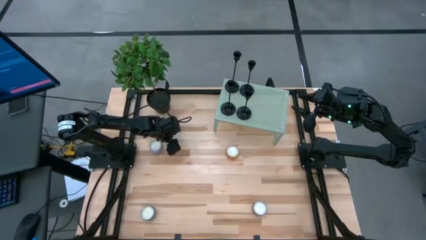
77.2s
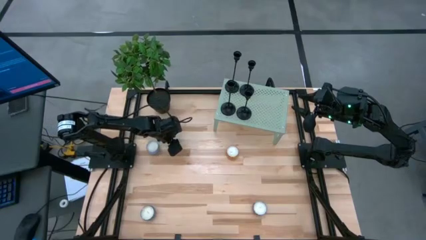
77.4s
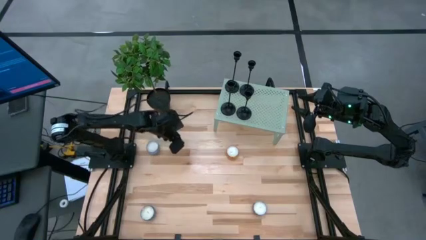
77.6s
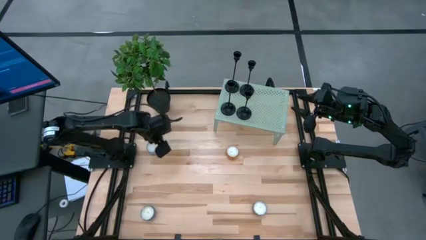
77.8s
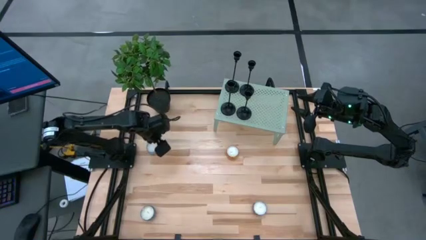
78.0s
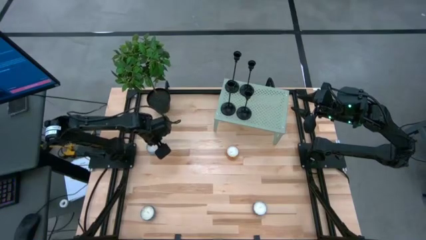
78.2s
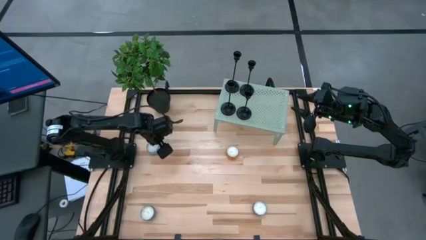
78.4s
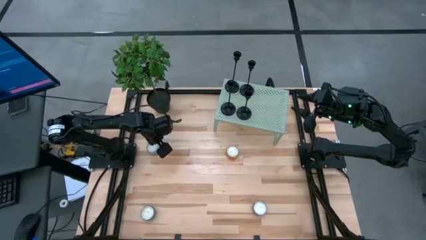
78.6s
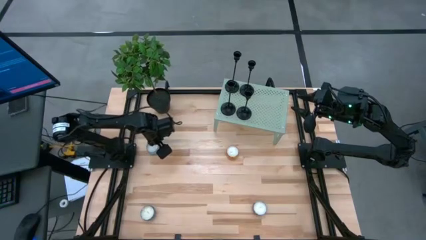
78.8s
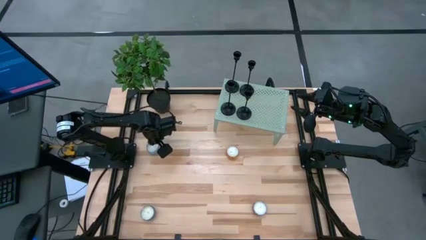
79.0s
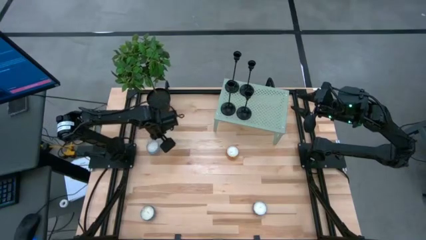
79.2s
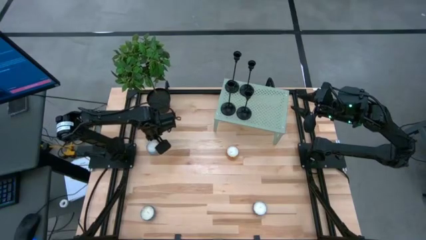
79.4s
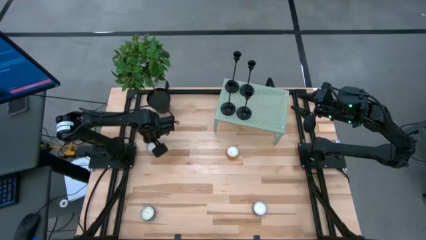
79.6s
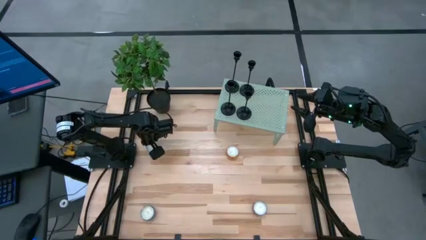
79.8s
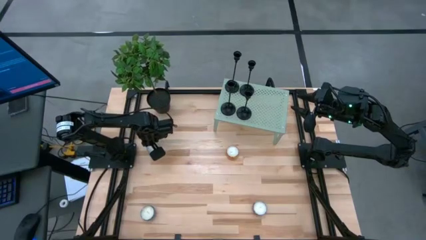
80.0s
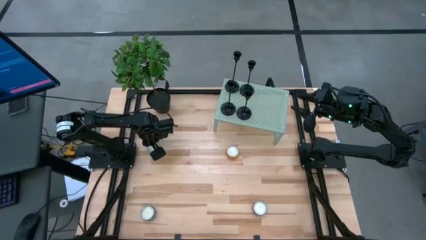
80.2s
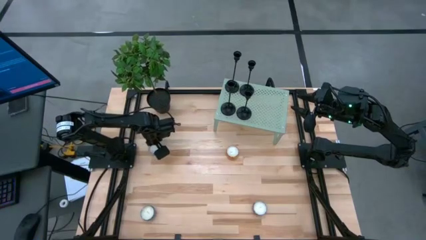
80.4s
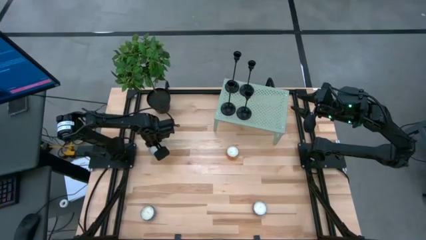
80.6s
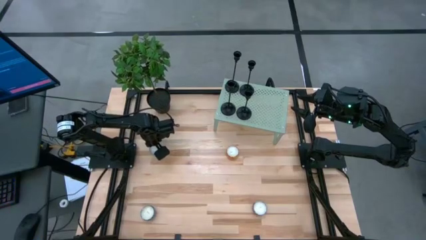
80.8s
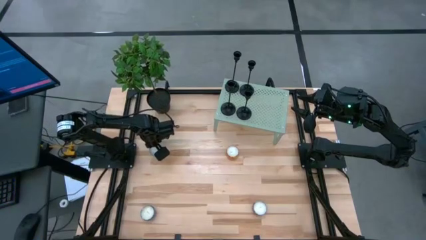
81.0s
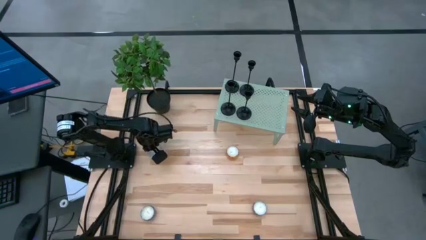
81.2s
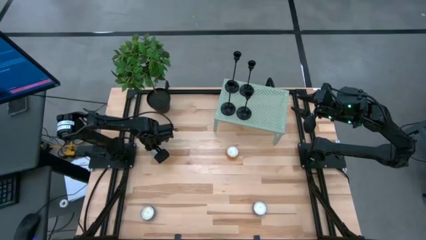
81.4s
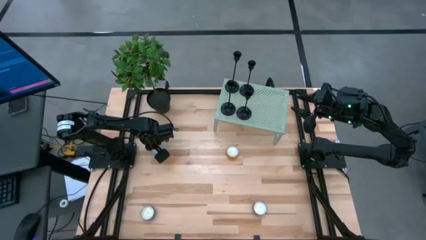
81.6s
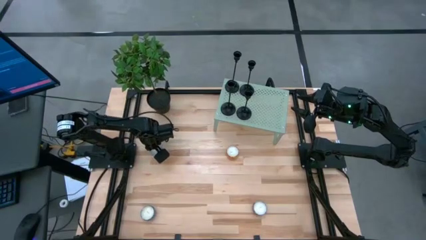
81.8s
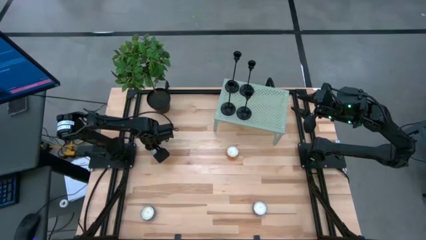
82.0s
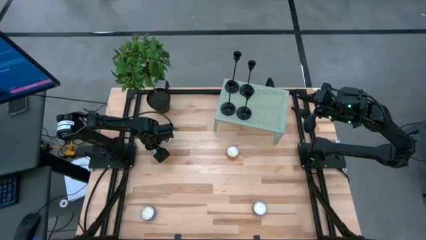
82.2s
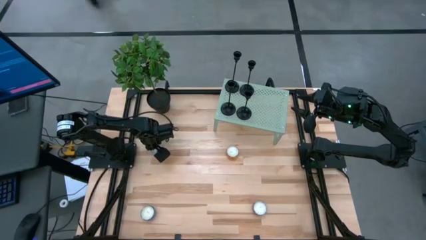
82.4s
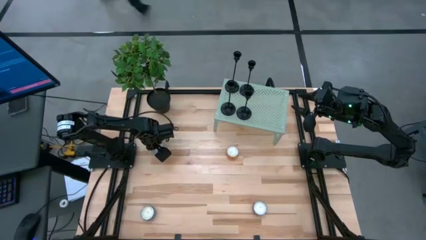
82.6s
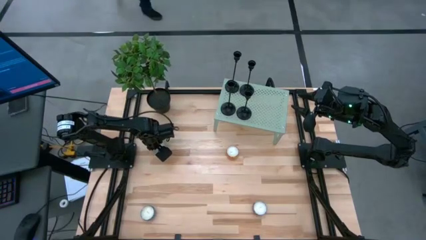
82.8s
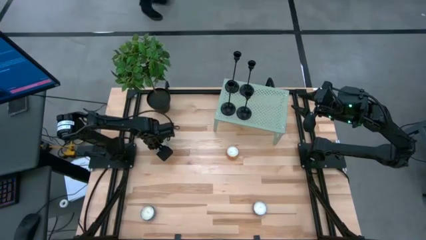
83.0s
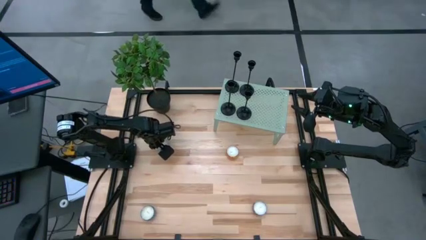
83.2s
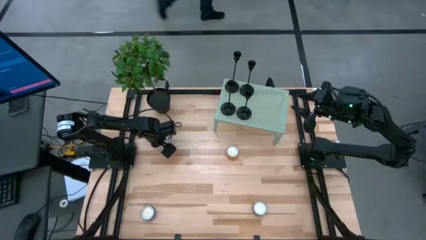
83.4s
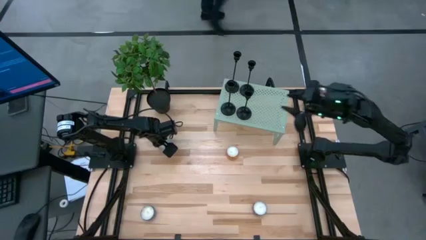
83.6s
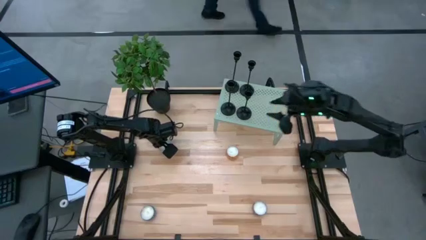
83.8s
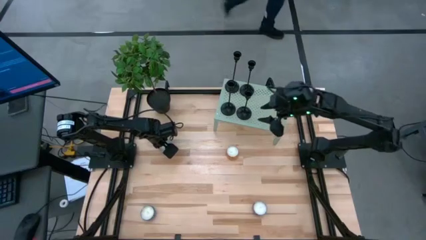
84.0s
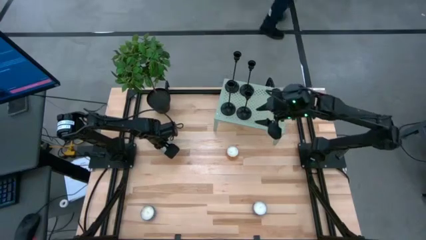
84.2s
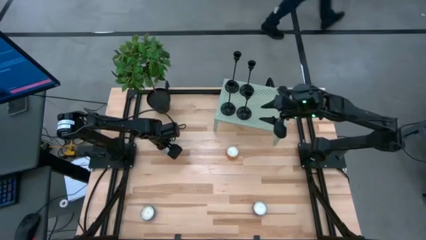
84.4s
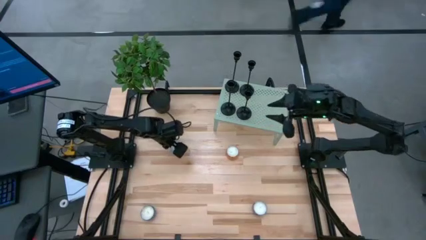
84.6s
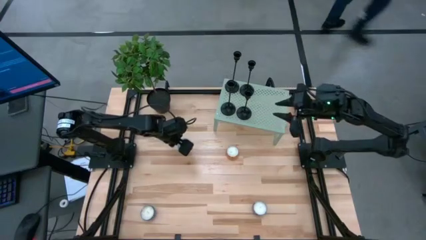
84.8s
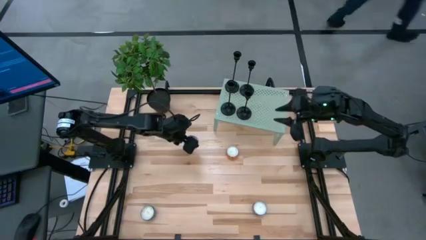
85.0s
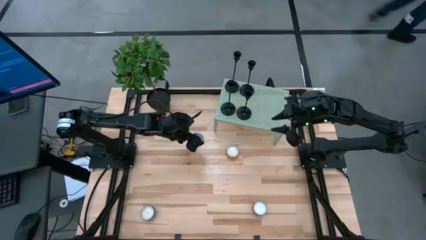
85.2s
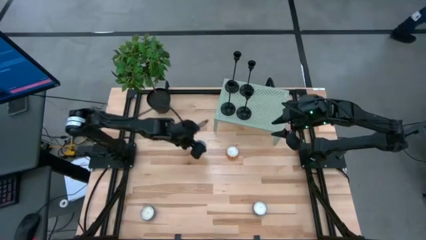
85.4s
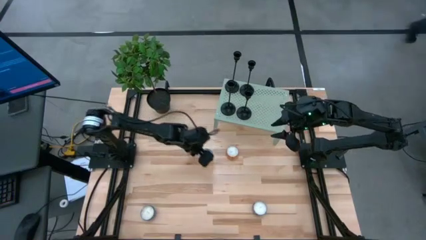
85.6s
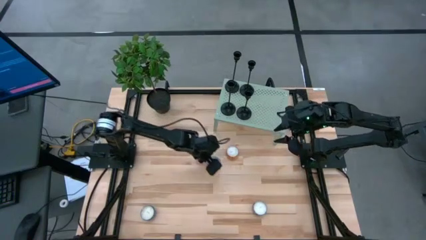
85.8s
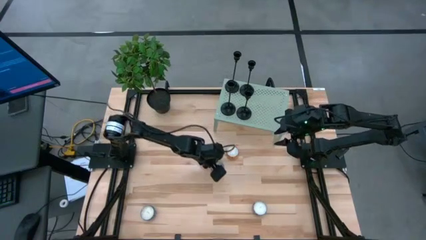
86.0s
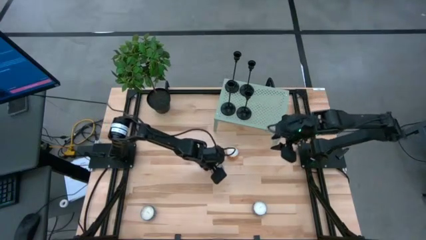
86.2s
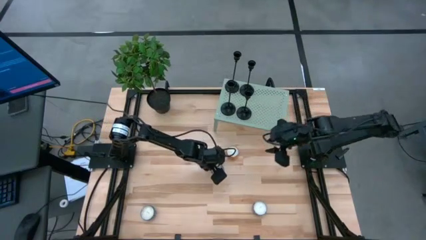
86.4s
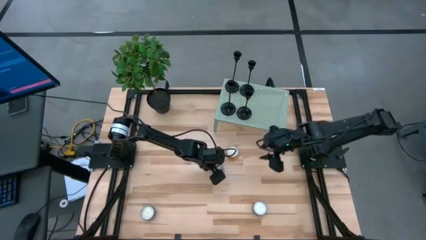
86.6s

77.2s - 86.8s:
Task: Pick & Place candle stick holders
Move the blue scented candle to the center of the table

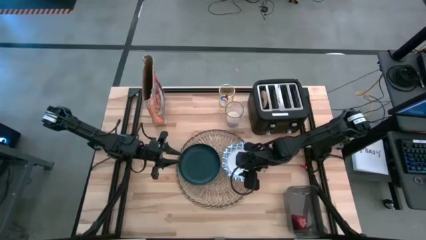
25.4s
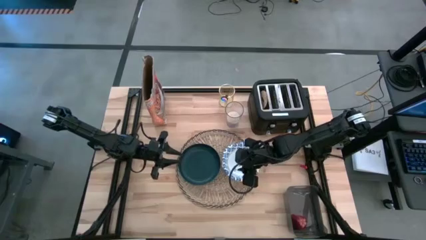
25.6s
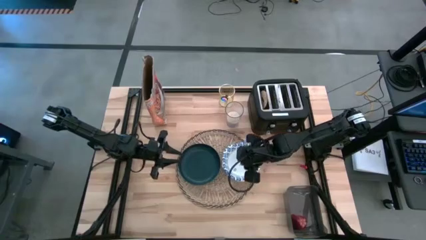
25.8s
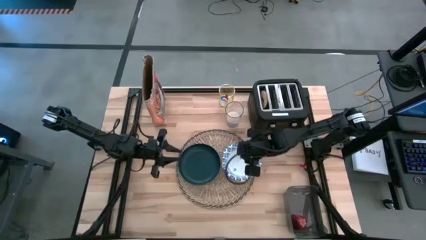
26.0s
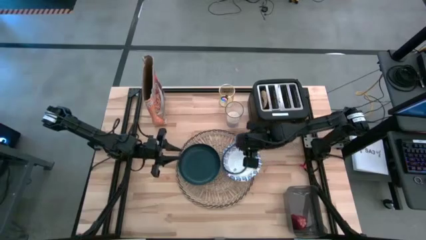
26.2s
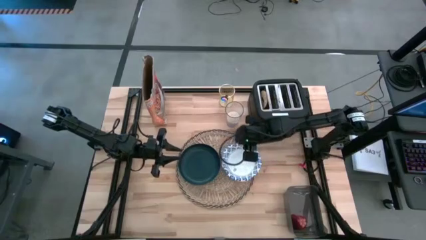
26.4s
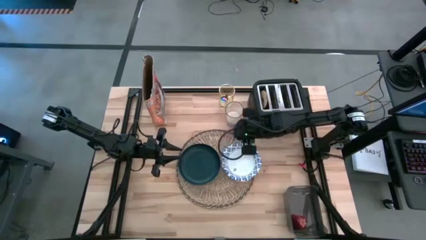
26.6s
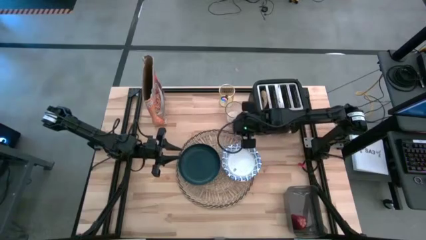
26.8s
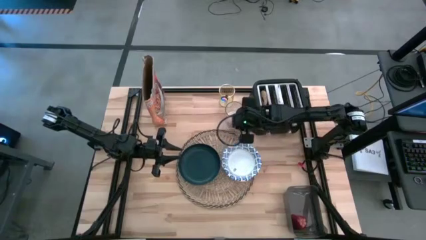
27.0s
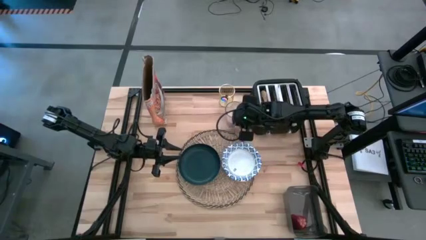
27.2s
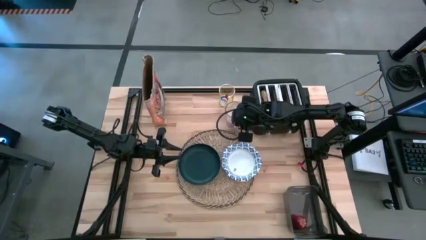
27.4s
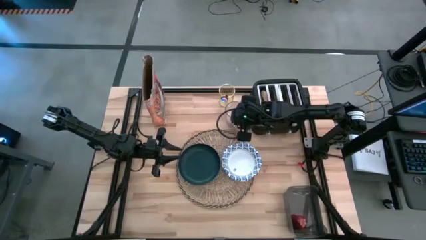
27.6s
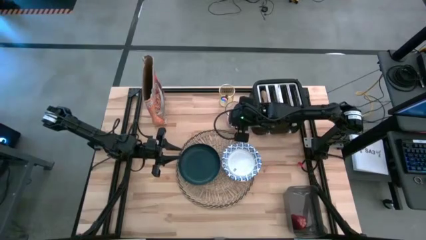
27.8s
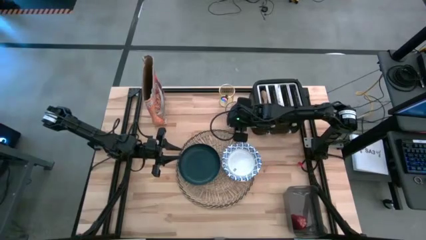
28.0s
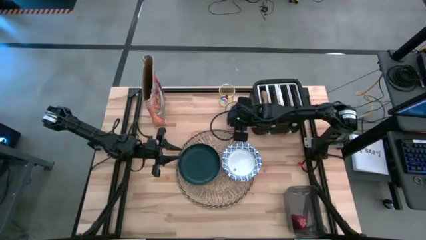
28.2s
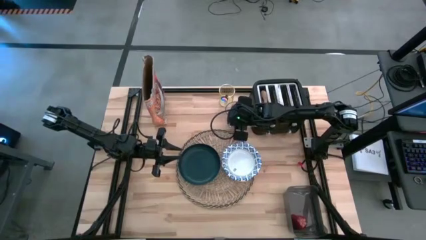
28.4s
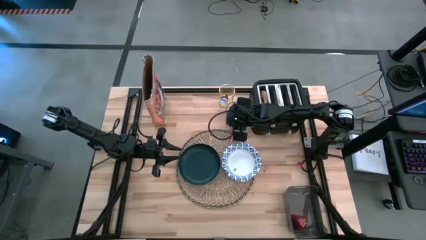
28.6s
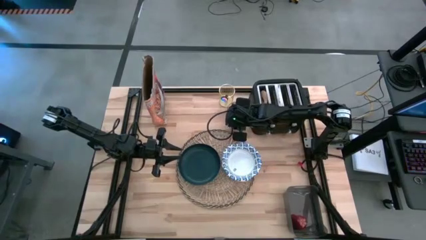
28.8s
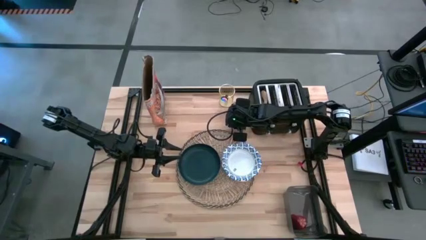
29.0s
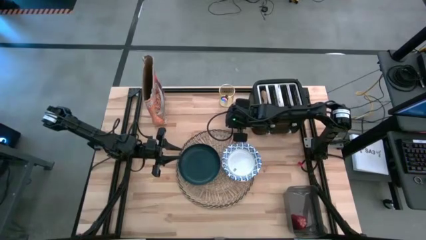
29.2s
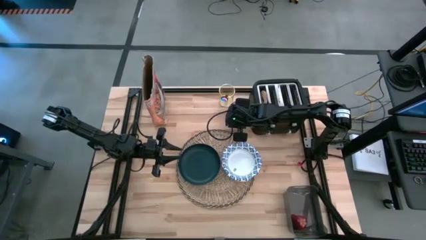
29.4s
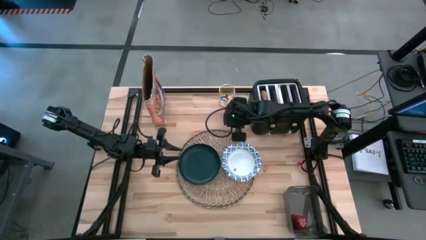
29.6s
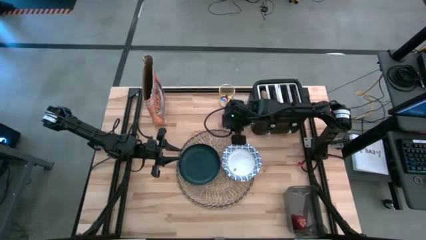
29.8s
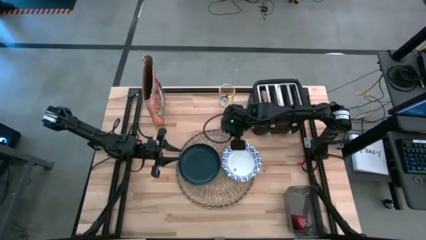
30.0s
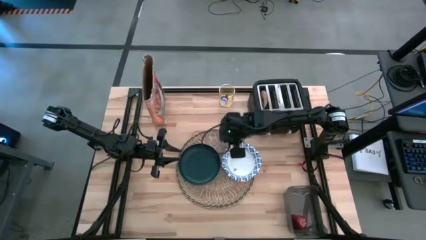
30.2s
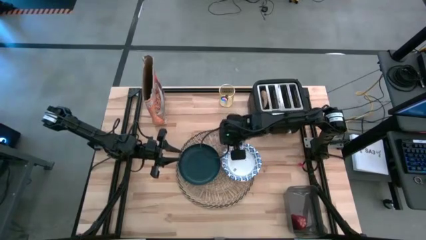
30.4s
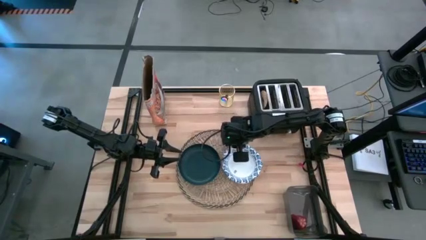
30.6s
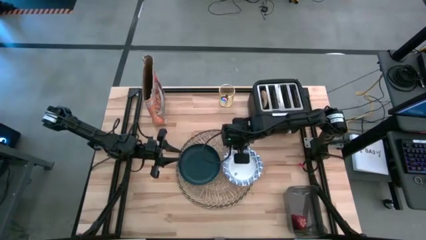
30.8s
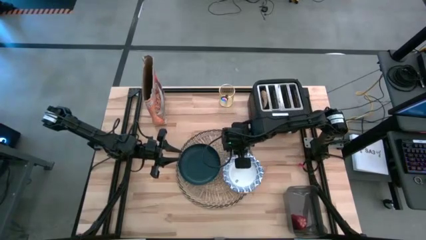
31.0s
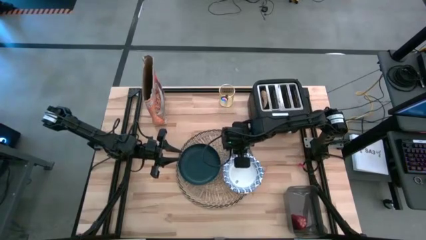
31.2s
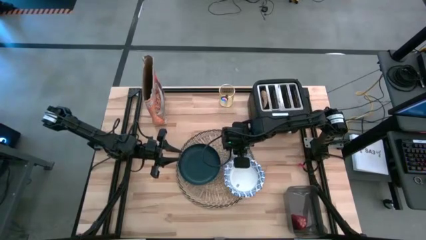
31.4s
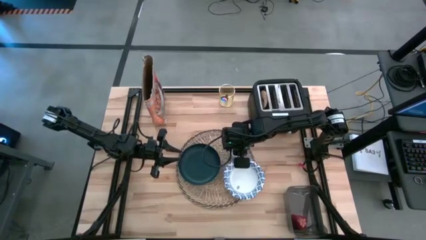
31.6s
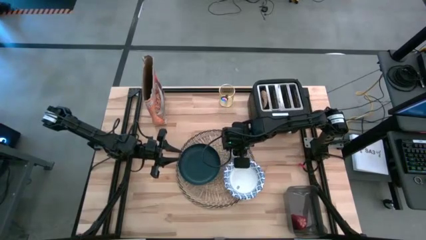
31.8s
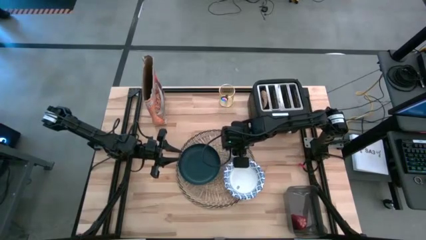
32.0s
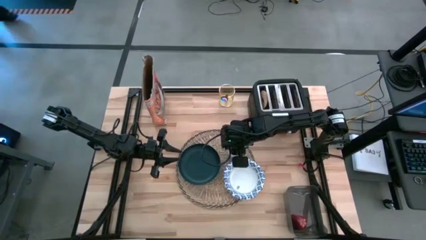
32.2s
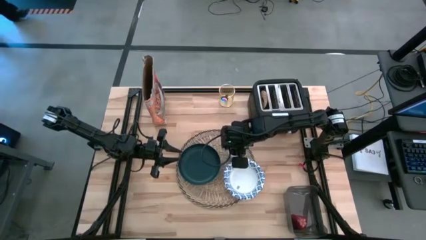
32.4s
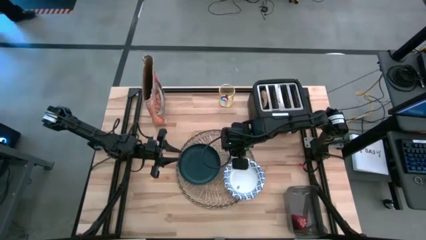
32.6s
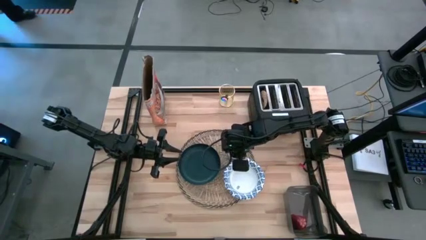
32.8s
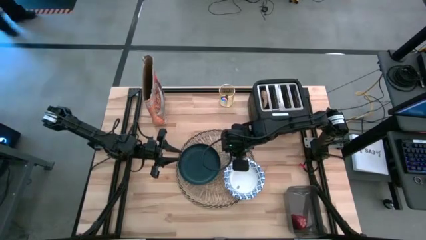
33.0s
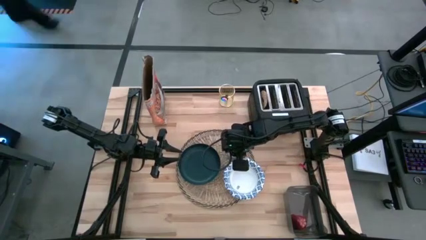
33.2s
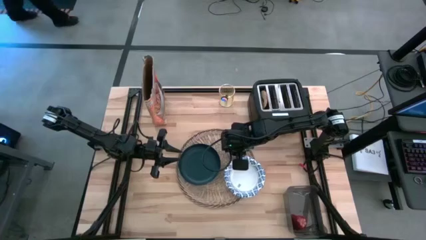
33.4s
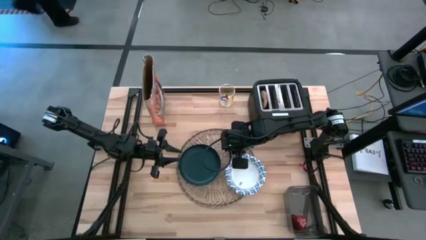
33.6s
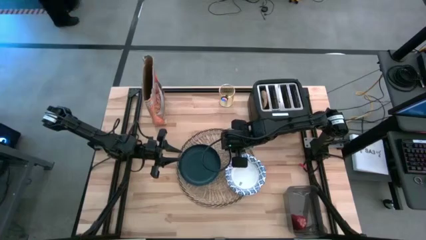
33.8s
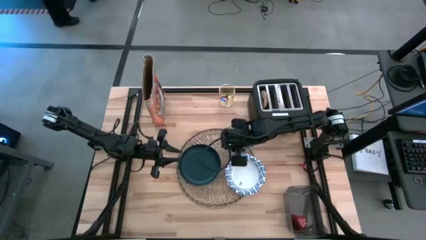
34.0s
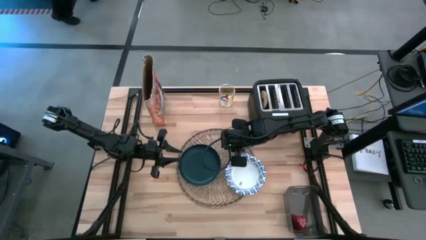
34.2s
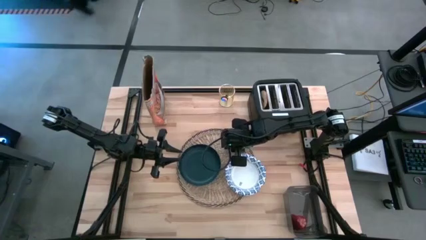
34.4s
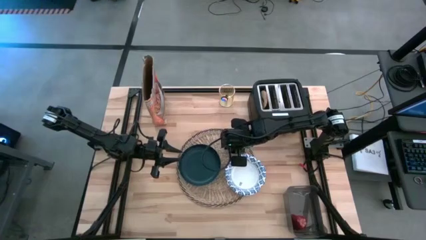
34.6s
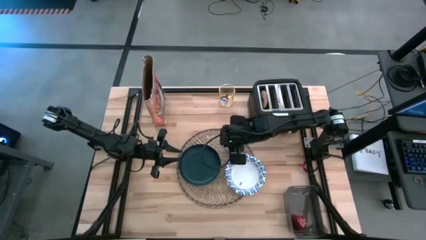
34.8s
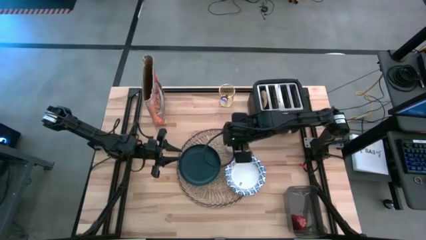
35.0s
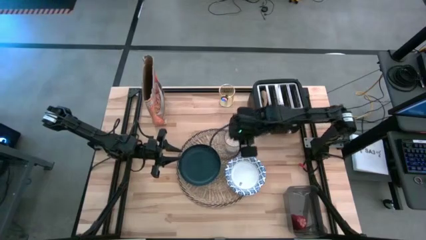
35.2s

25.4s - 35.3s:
Task: Arrange a breakfast setting
Put the cup of milk on the brown table placemat
